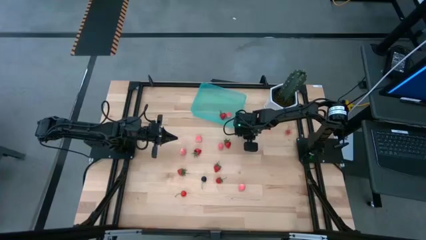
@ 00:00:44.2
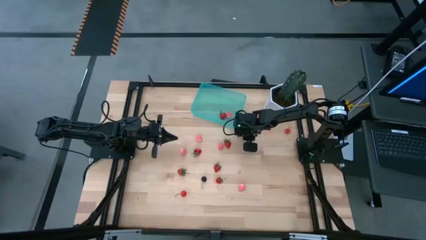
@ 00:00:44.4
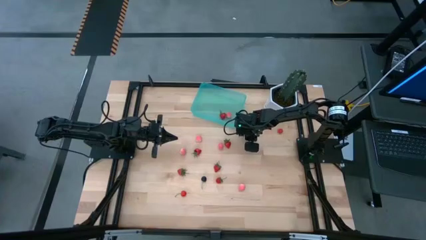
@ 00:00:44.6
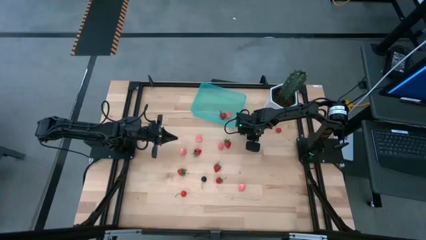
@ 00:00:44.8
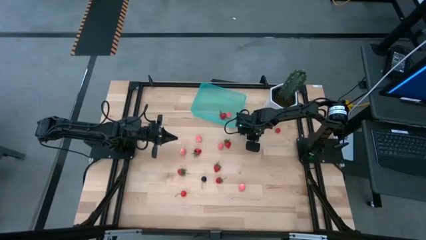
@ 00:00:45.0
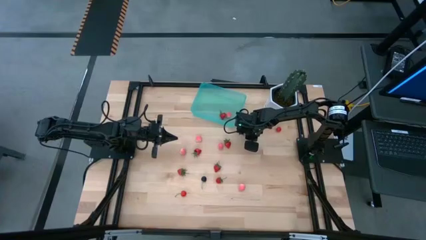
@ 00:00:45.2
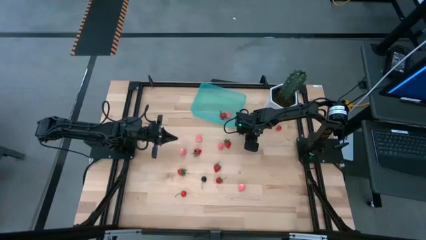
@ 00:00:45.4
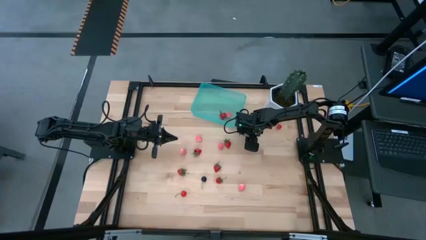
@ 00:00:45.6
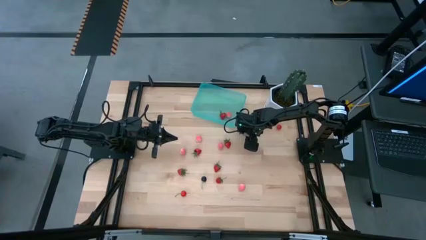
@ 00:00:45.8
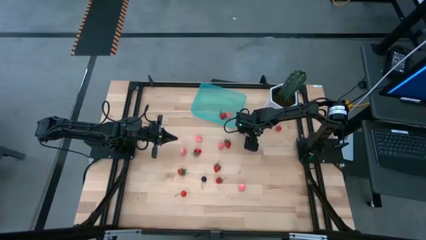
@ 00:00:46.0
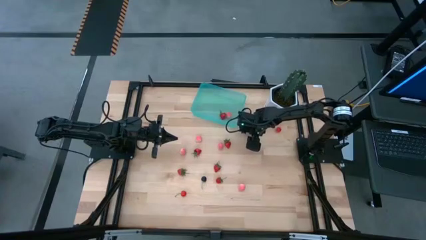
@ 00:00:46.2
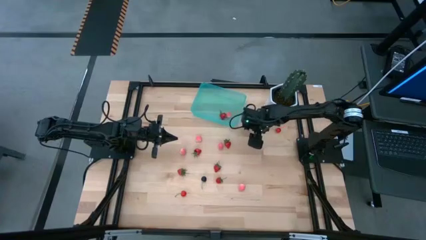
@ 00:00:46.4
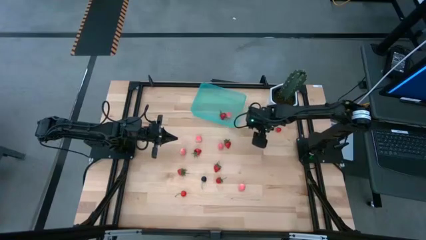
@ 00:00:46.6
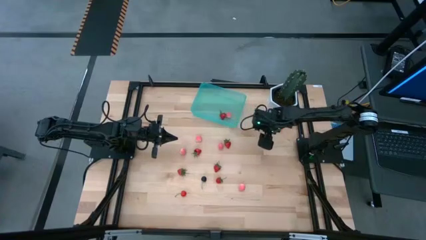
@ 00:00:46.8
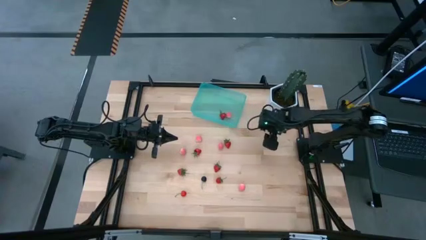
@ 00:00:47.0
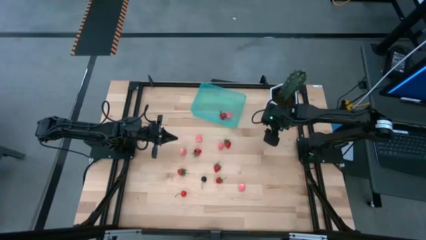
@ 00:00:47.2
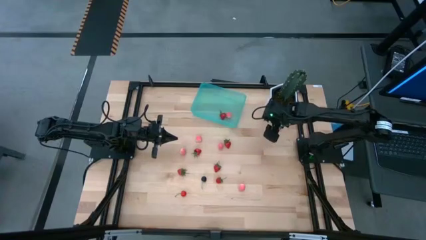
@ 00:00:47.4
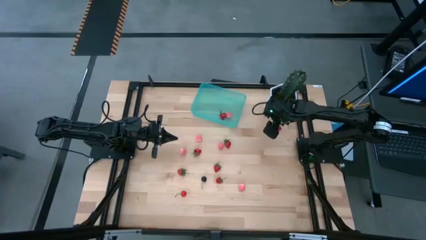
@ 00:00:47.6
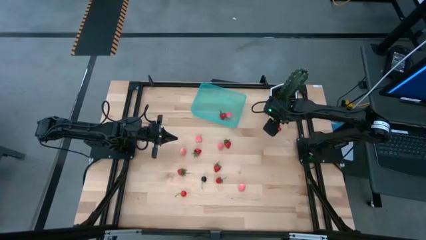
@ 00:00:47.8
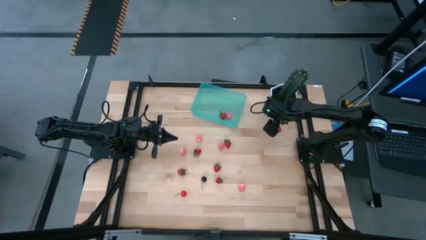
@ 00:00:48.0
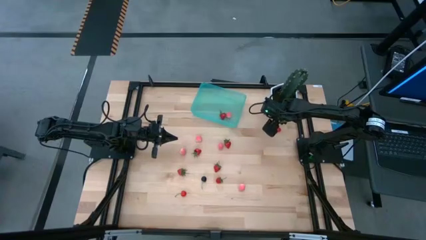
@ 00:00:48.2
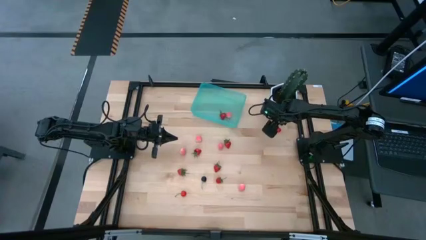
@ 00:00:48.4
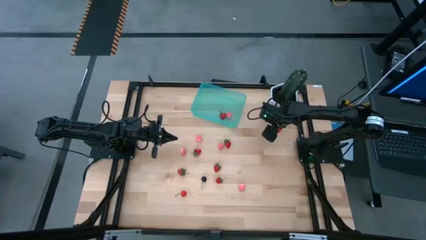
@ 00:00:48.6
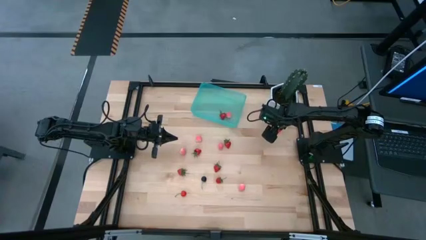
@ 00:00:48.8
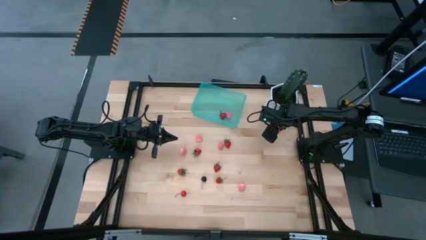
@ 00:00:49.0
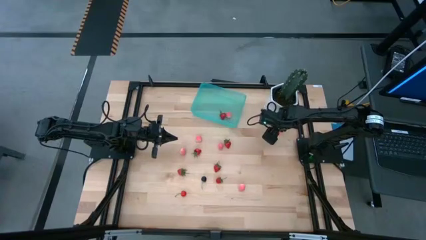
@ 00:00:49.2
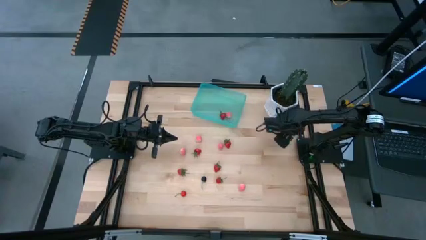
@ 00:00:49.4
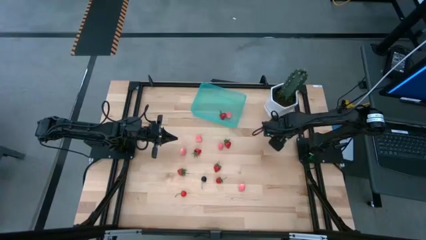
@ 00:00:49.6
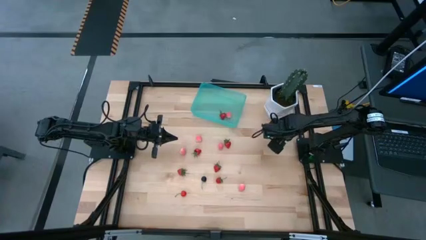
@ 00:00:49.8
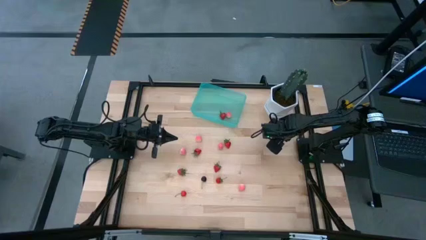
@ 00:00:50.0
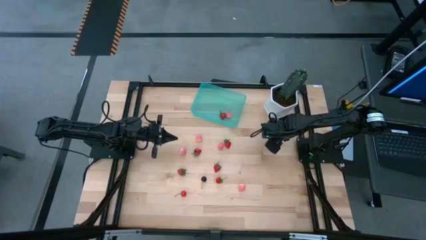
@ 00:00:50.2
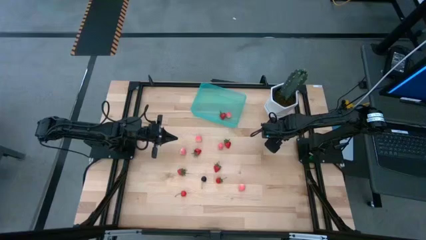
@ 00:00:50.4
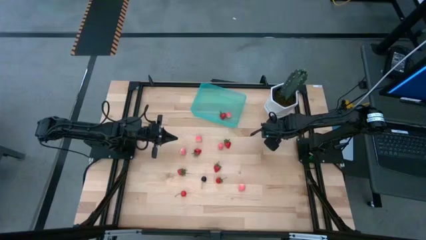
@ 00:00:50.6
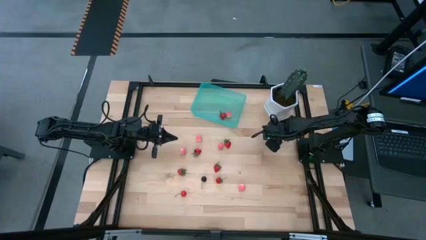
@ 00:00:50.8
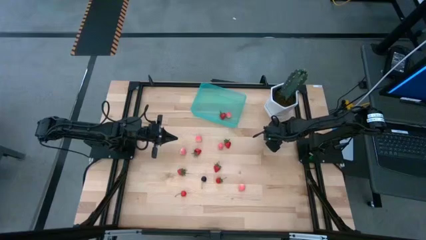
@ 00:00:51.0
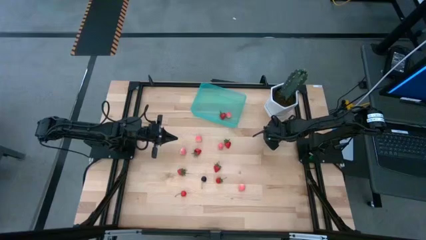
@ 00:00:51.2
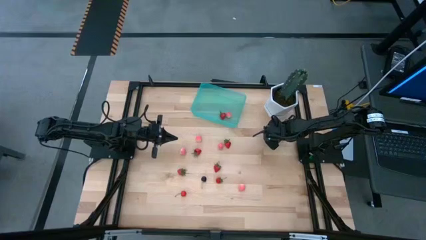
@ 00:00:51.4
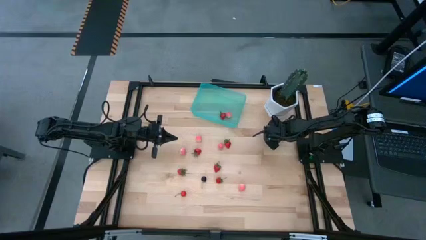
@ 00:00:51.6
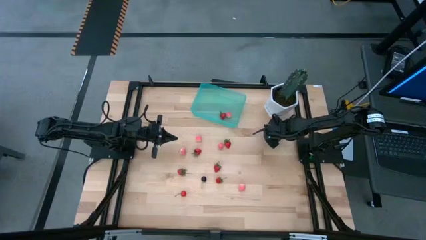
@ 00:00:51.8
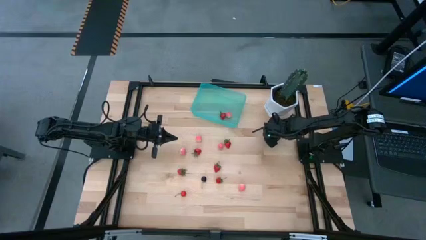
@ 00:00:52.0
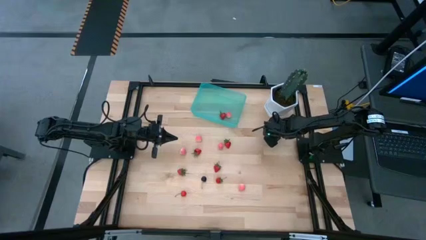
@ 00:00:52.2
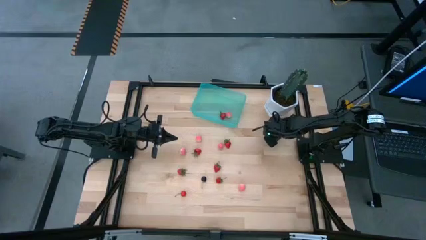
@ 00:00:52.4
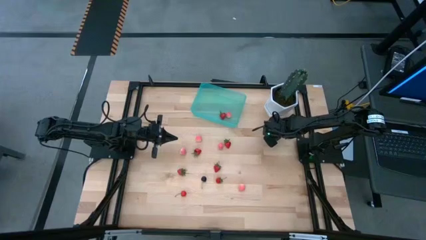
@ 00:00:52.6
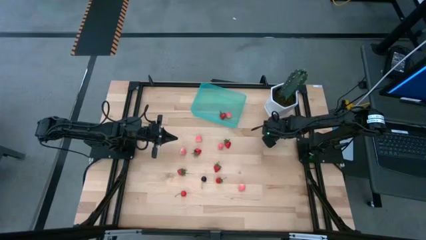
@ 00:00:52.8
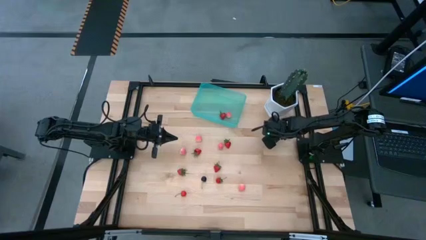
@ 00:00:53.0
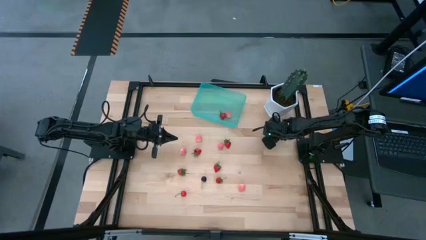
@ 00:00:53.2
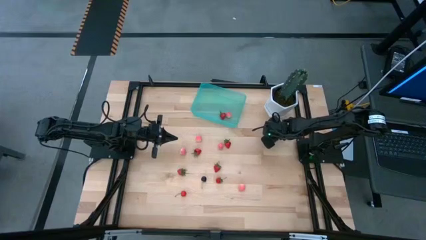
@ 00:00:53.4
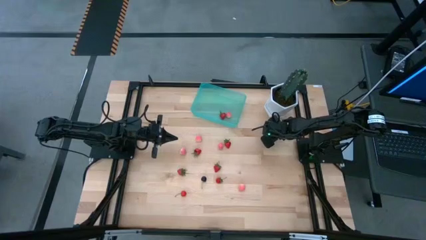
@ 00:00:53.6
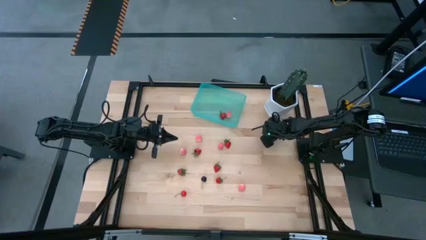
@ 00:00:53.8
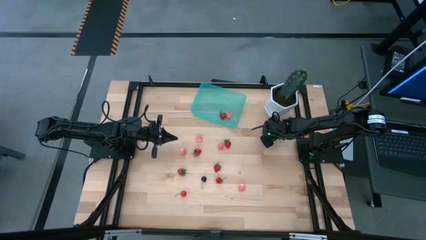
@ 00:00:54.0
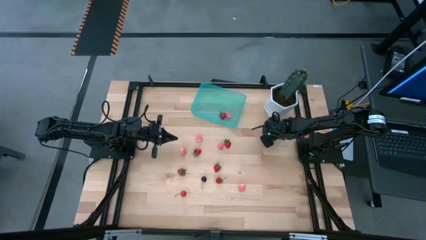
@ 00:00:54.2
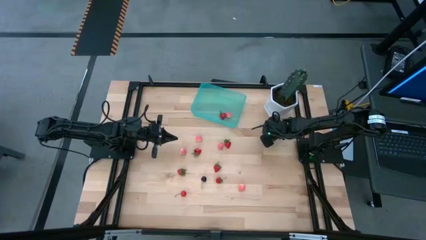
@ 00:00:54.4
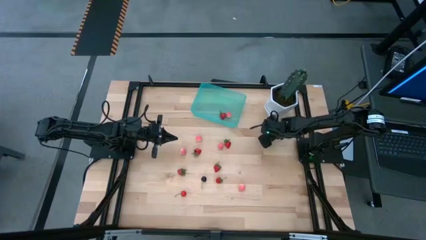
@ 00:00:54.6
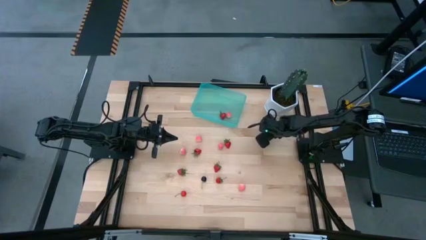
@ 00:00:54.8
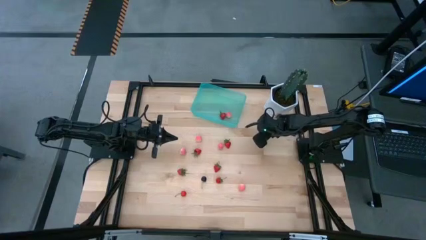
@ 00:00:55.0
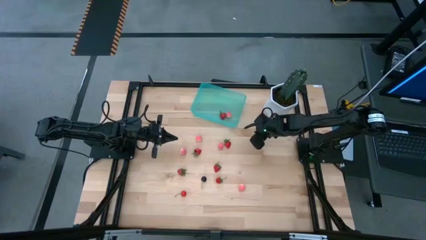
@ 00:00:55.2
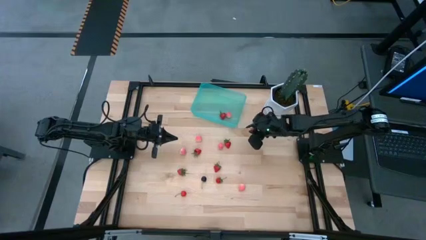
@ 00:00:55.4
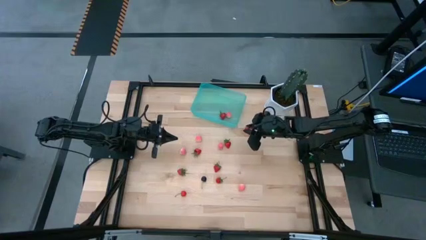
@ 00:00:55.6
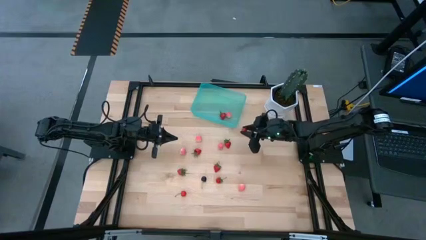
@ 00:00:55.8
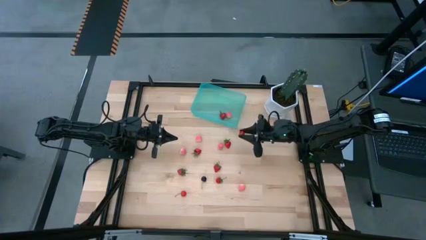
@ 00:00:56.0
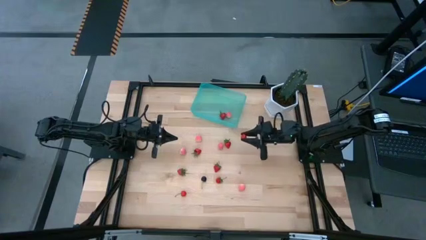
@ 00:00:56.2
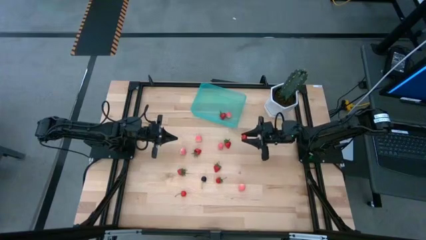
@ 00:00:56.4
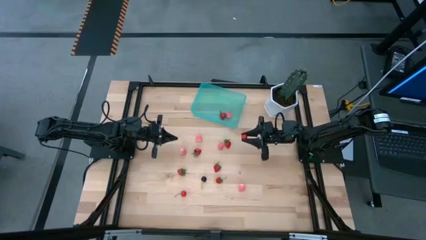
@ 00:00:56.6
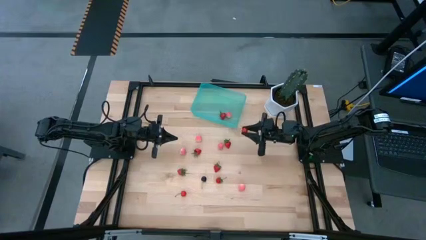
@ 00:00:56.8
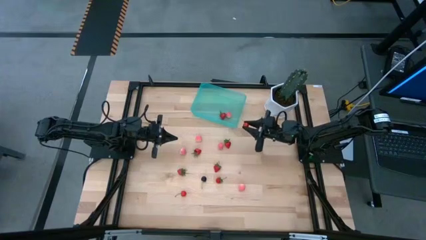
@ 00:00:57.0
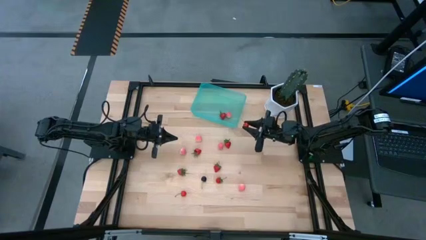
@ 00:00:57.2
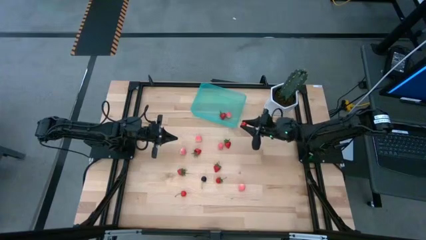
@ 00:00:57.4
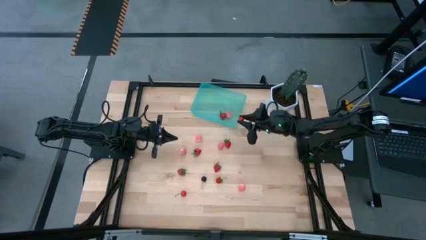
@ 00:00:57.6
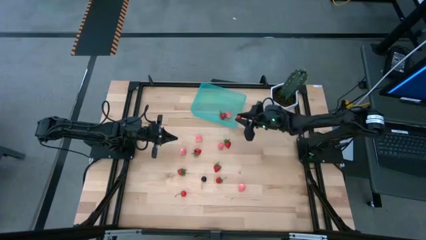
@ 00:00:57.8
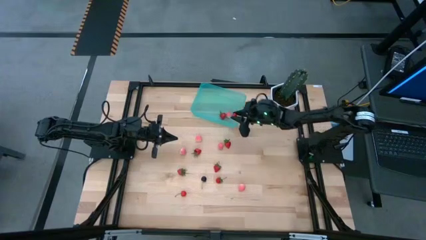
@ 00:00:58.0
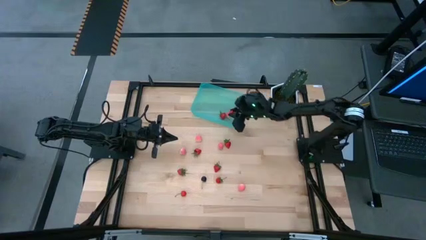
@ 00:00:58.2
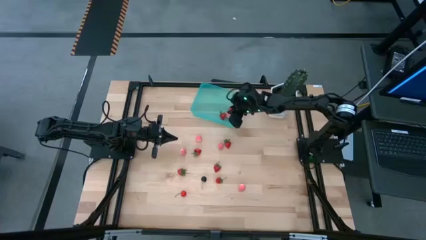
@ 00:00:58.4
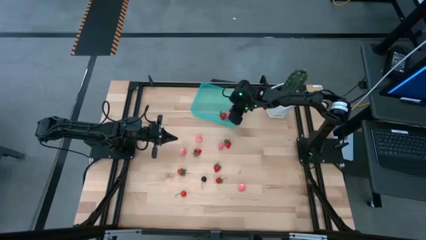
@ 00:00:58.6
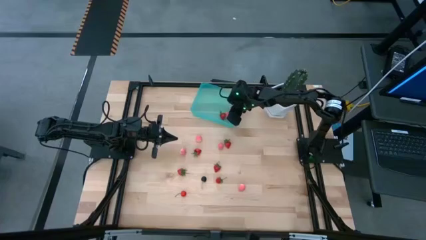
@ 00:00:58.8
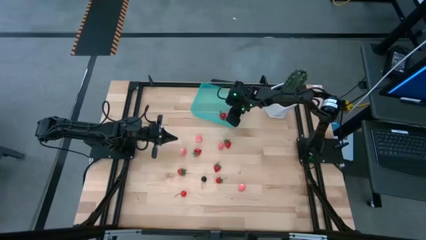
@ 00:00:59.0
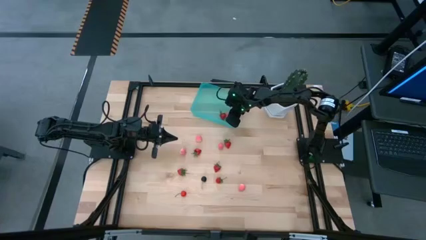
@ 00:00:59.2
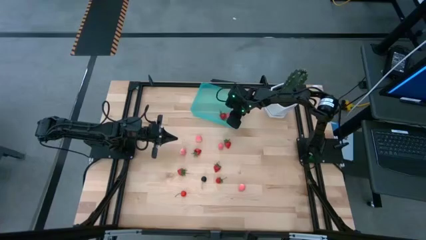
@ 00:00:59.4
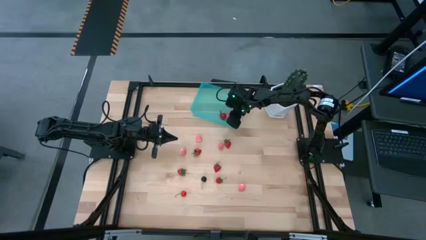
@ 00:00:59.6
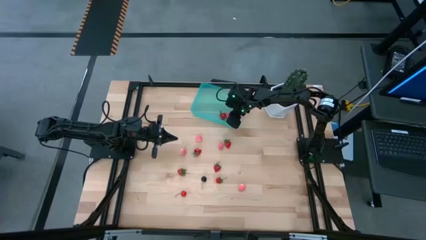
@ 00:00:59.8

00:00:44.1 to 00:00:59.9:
Task: Pick and placing Produce into tupperware
Put the red cherry into the light blue bin
